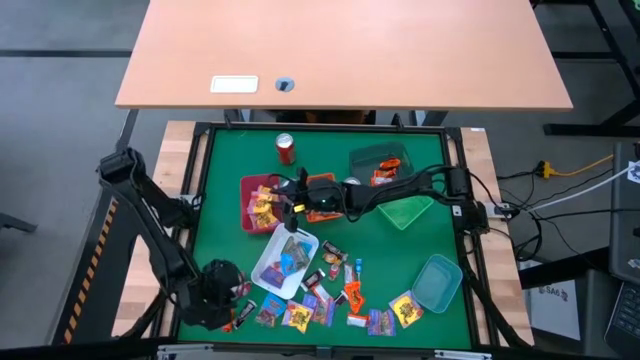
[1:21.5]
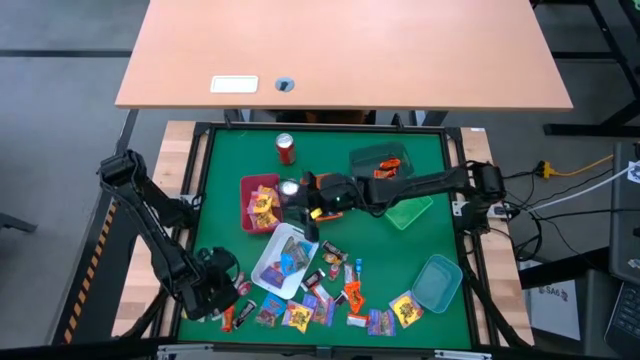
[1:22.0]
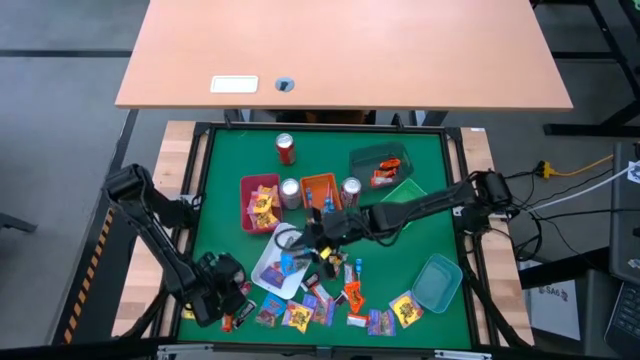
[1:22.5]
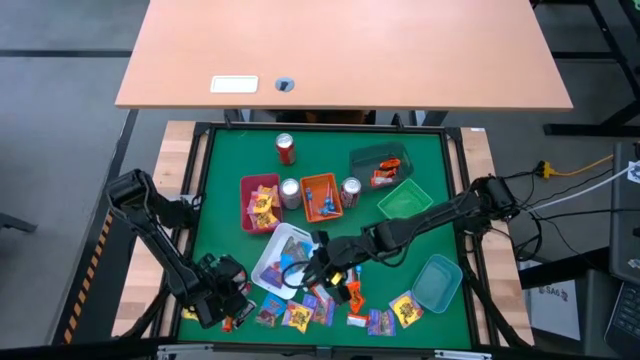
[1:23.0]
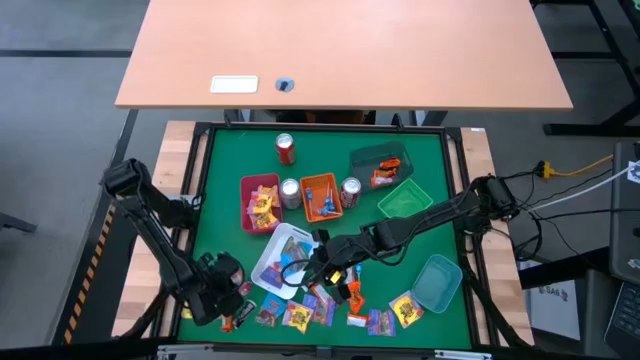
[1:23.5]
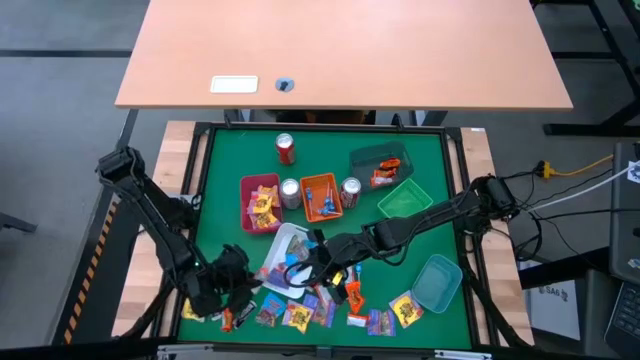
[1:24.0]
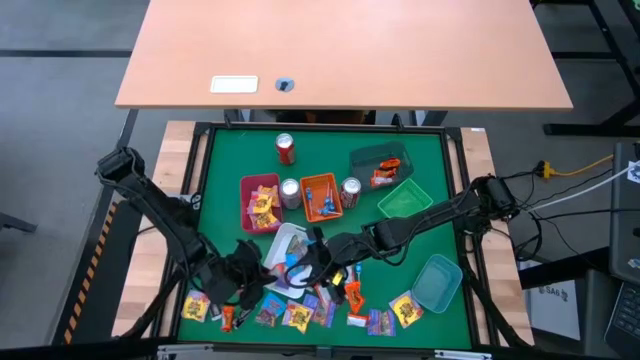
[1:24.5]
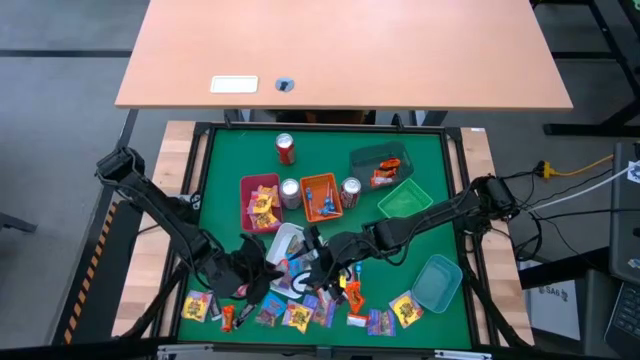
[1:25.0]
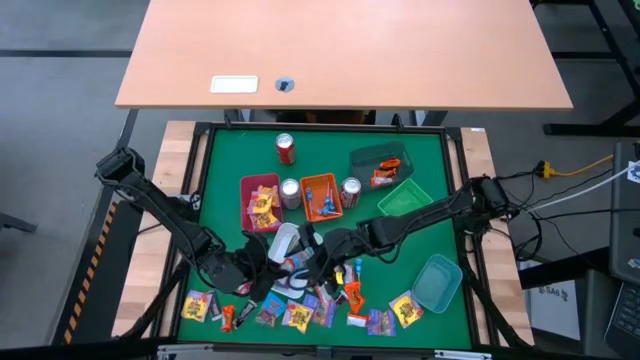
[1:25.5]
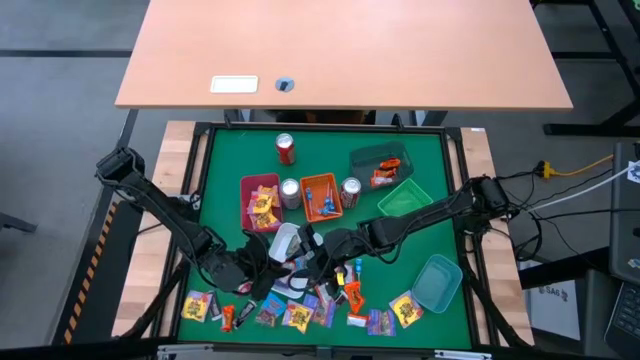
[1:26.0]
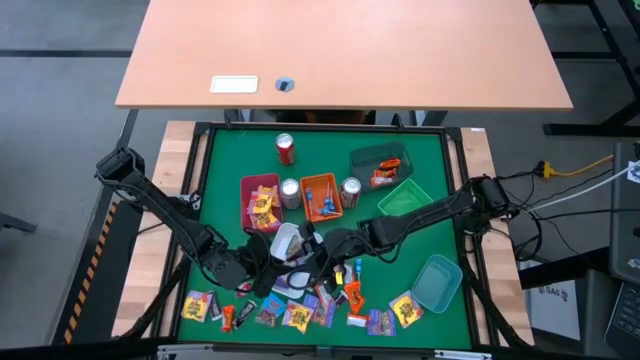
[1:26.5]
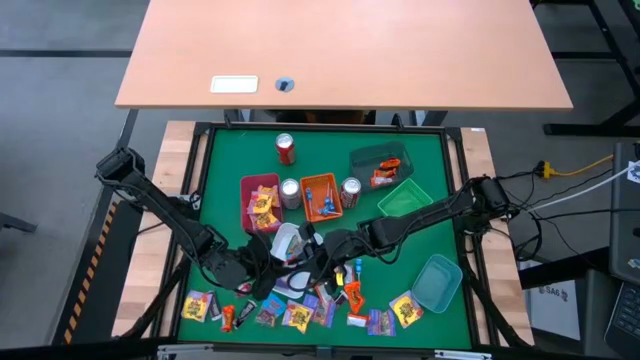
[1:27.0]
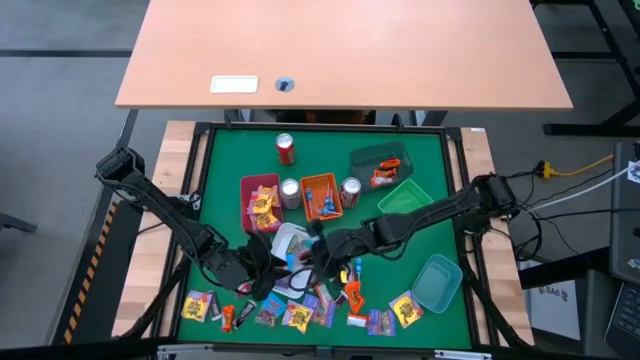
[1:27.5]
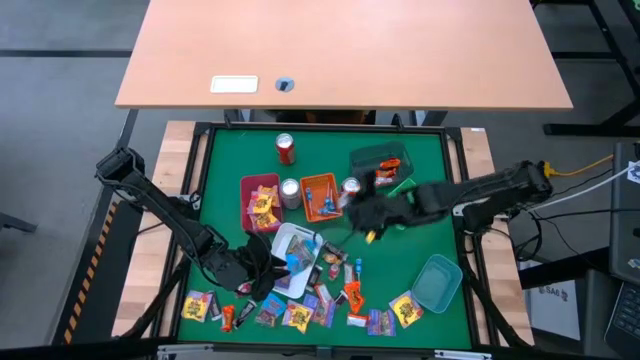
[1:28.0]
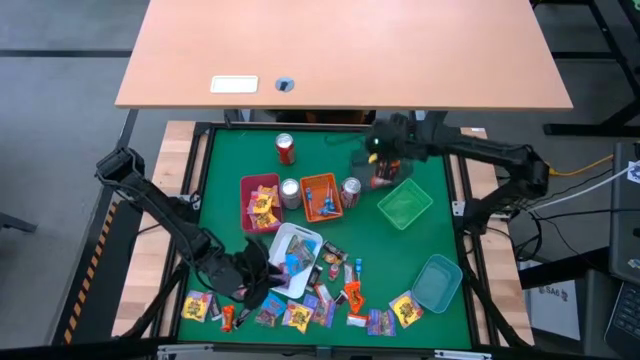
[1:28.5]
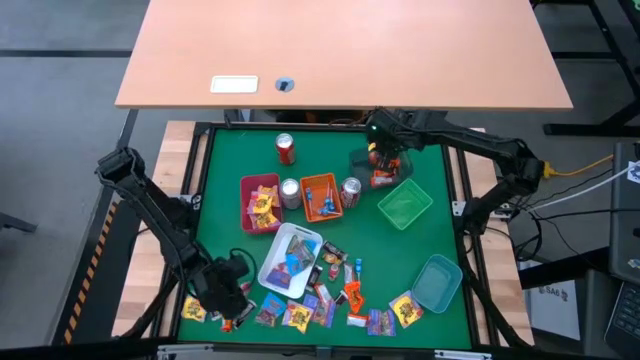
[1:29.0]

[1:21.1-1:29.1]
Task: Sort candy
Put the orange candy into the black bin

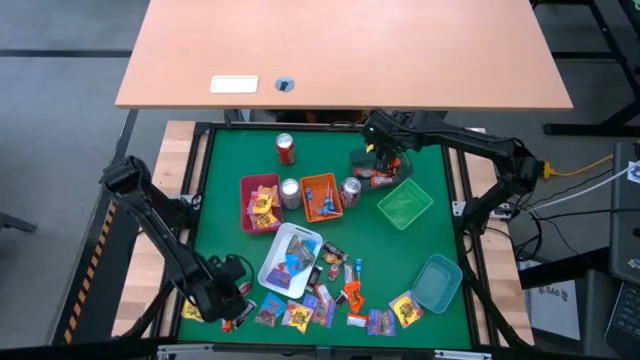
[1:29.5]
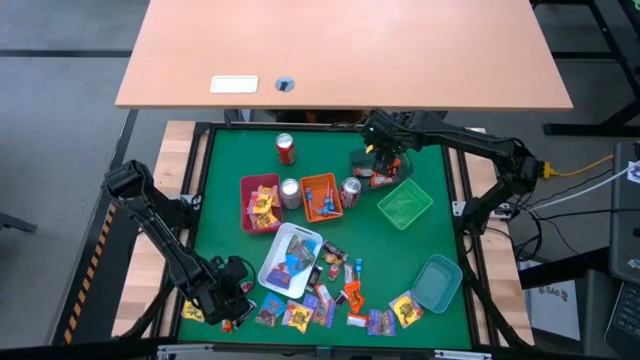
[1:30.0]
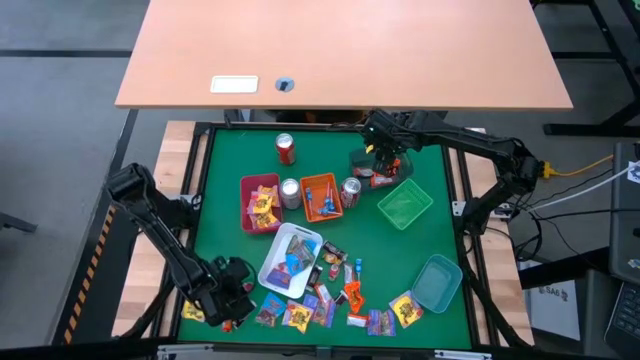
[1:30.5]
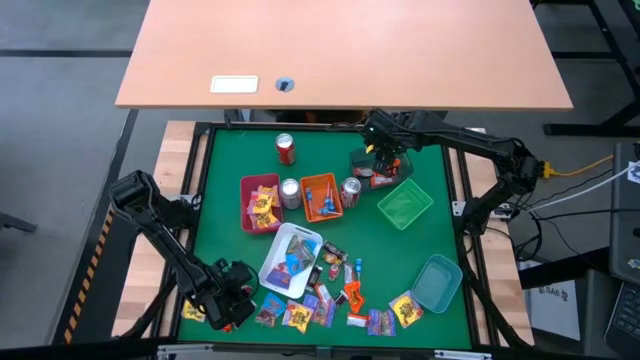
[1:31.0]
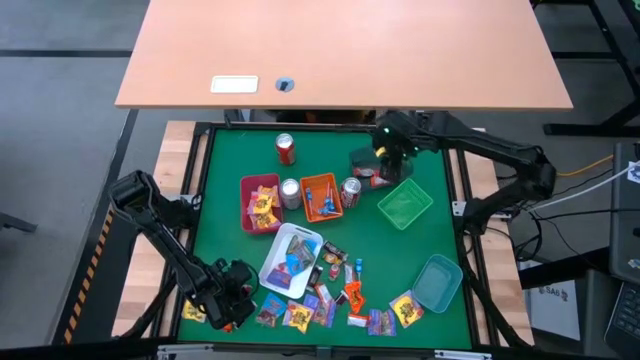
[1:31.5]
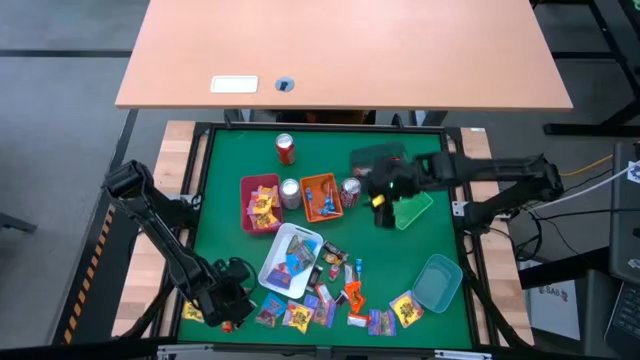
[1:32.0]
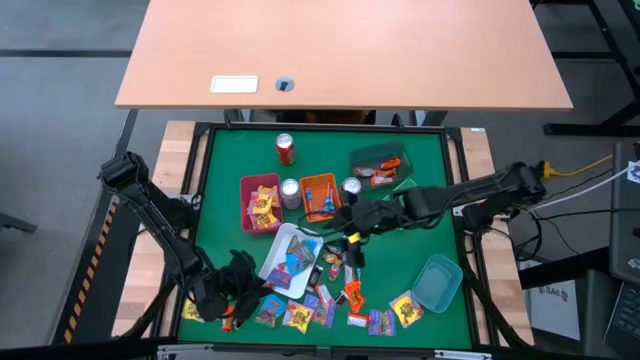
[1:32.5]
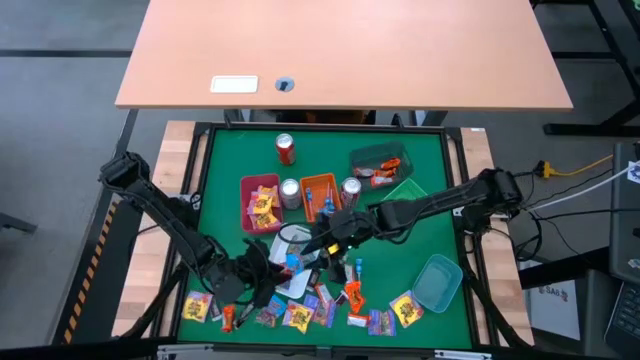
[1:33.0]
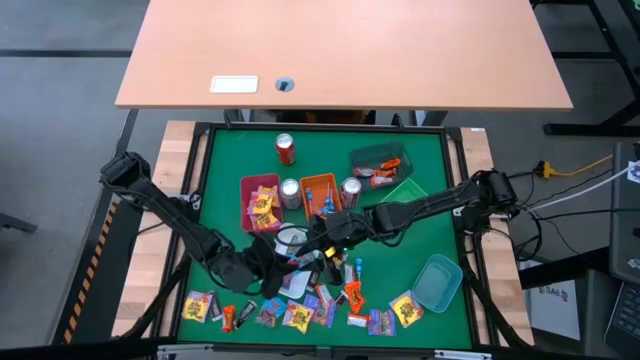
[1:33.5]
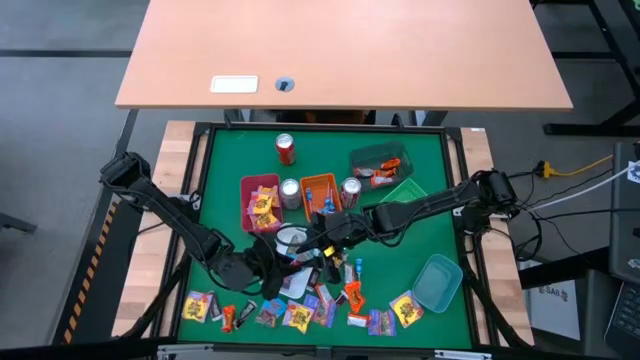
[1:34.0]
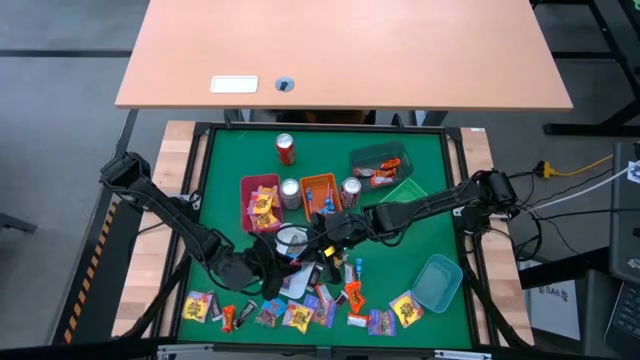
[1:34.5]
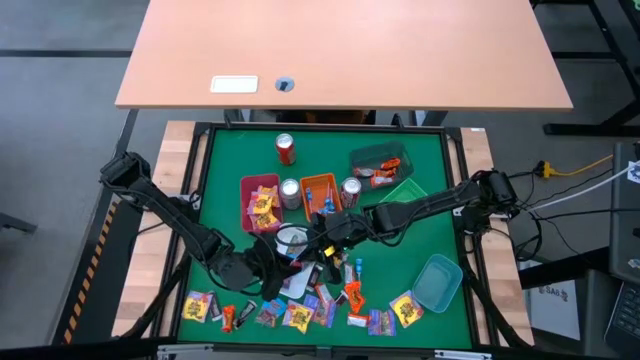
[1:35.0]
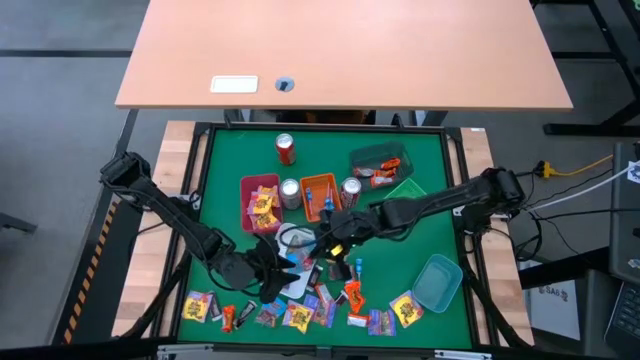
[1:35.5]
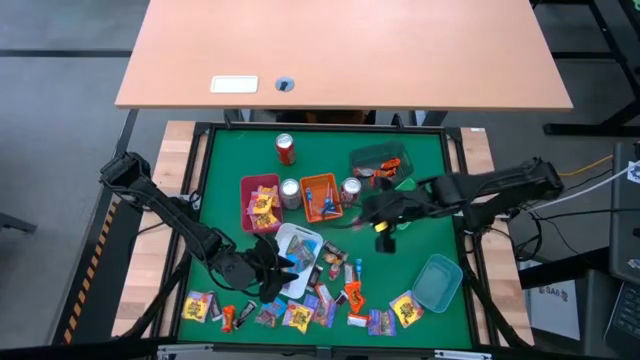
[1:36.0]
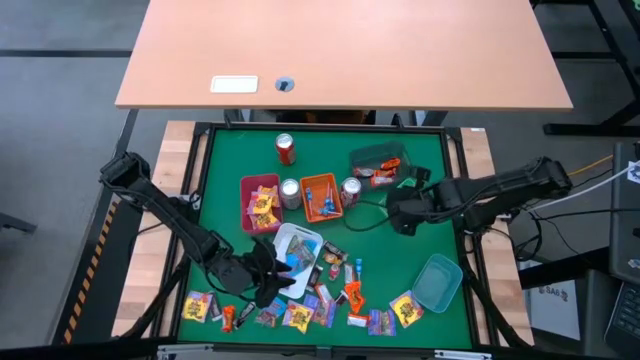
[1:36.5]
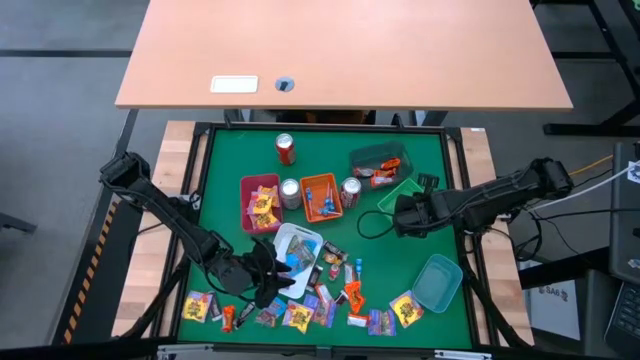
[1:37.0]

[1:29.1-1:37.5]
Put the red chocolate into the green bin

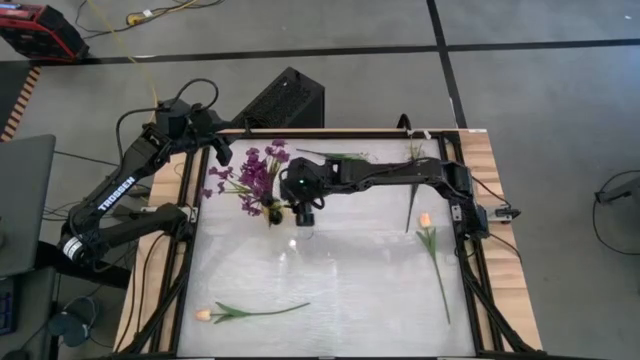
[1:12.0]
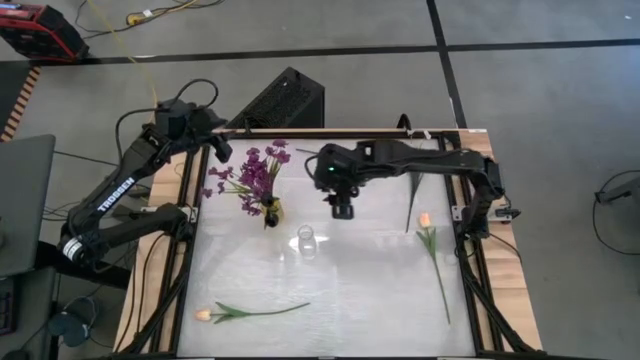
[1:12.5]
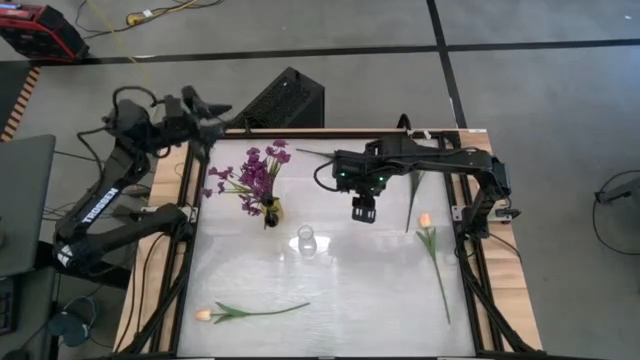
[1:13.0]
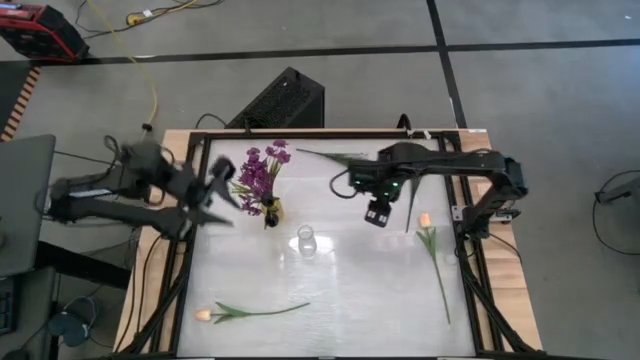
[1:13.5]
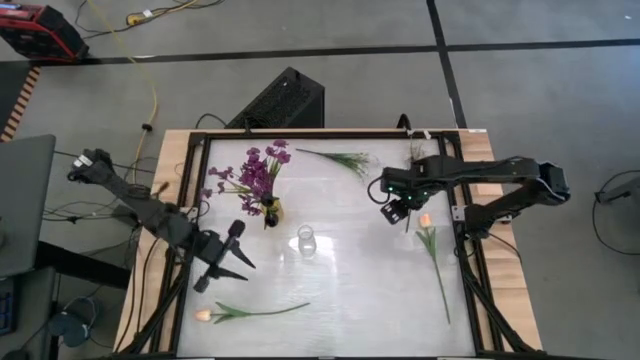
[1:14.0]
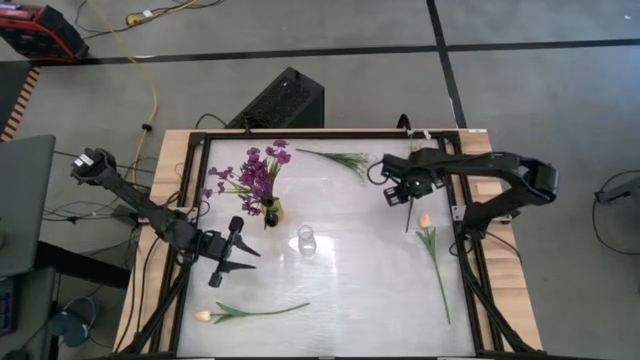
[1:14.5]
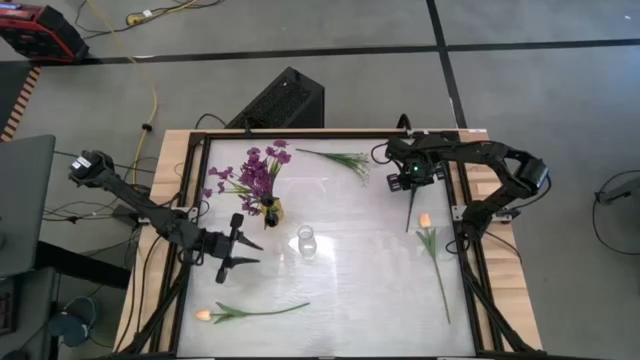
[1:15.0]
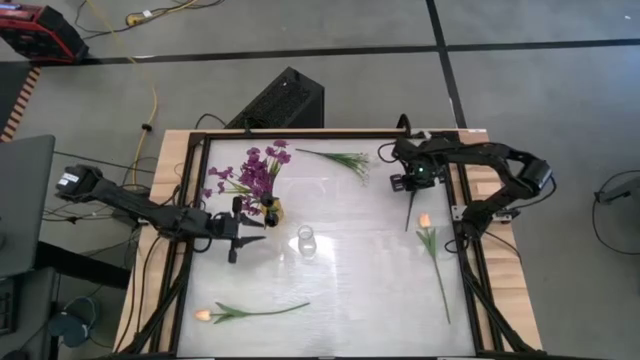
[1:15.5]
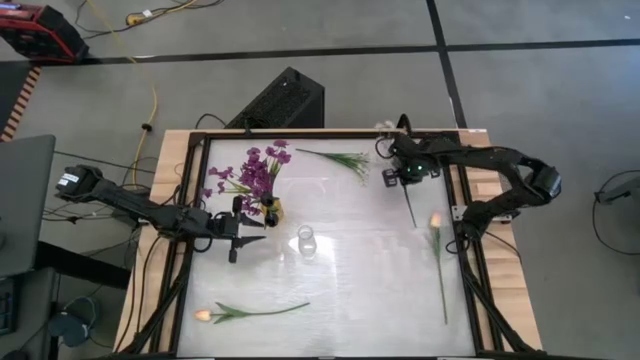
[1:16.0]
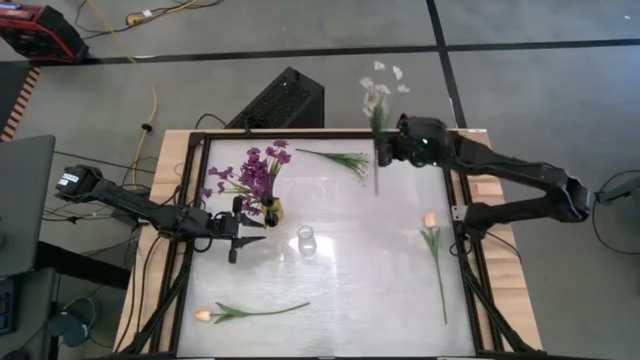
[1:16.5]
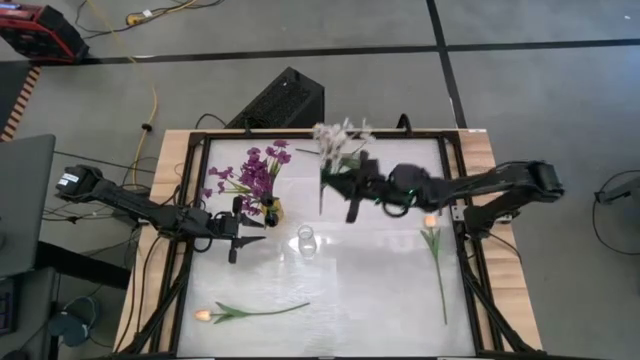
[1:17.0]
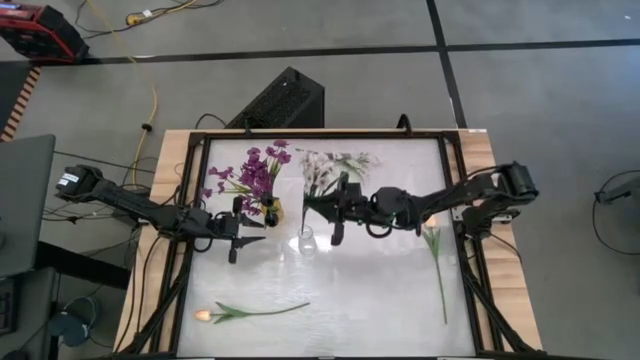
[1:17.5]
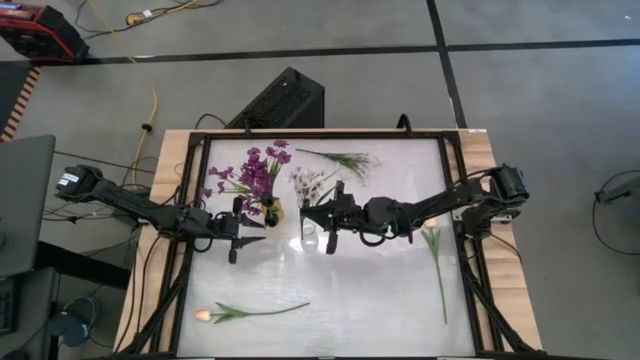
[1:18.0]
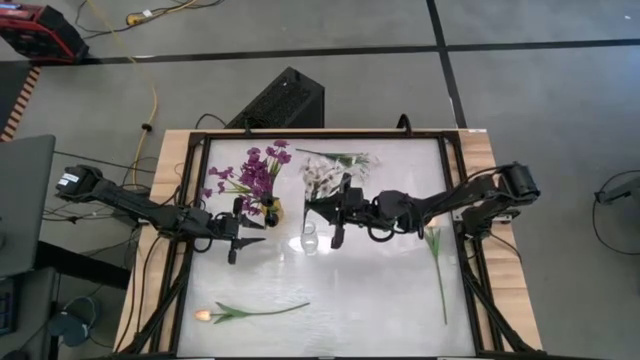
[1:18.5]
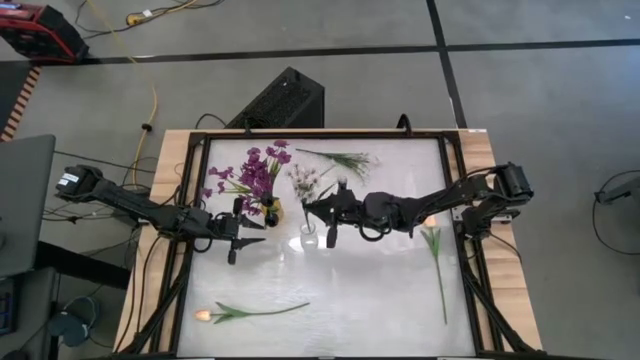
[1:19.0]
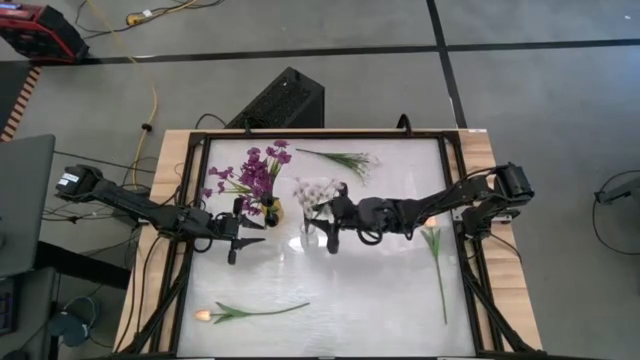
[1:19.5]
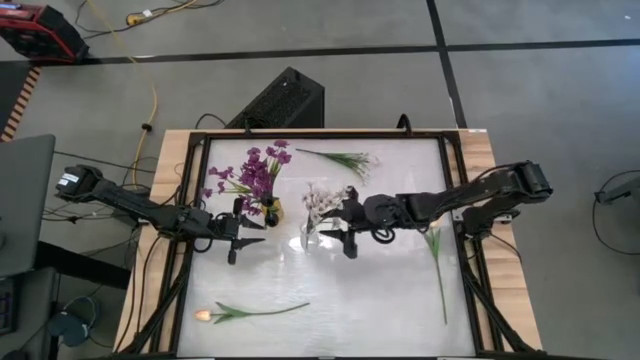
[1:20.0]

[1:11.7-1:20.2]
Task: Sort flowers into vase by color
Put the right white flower into the transparent vase
